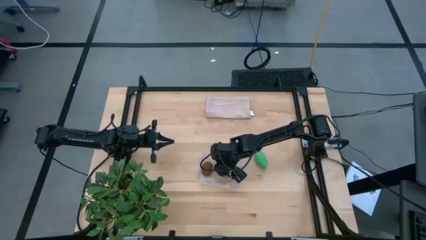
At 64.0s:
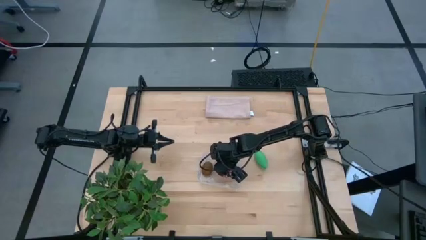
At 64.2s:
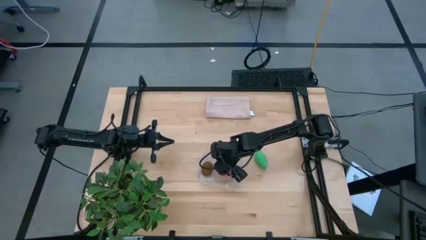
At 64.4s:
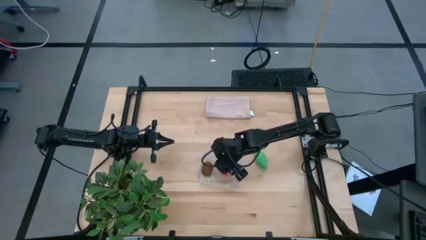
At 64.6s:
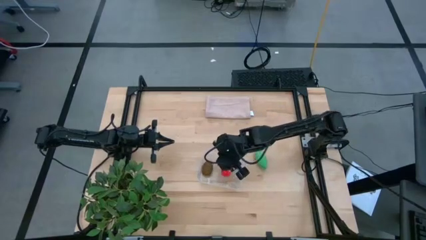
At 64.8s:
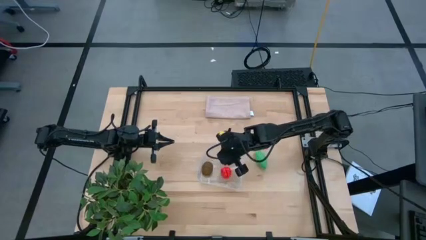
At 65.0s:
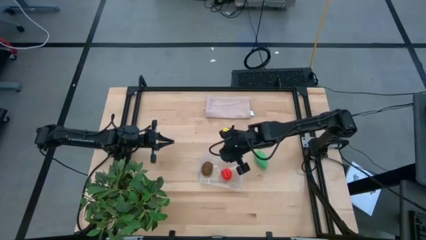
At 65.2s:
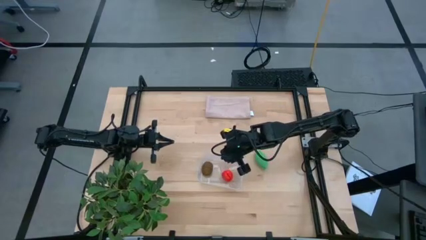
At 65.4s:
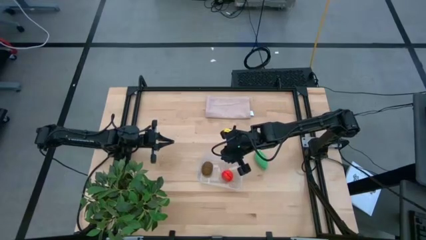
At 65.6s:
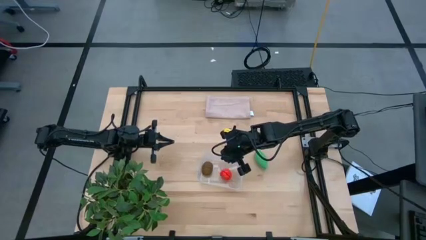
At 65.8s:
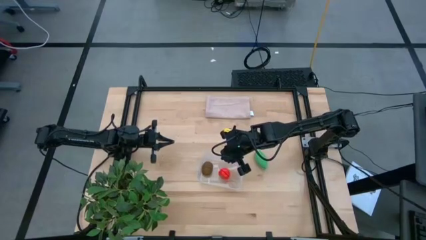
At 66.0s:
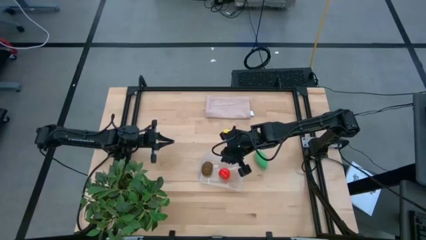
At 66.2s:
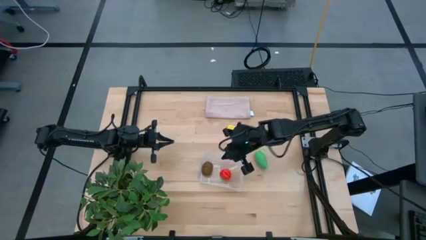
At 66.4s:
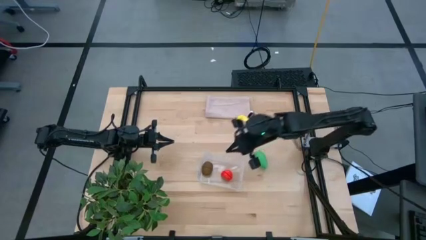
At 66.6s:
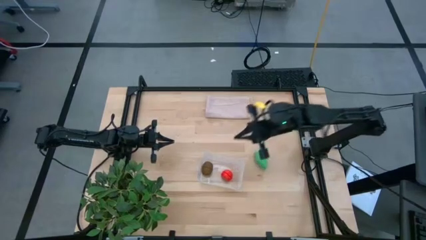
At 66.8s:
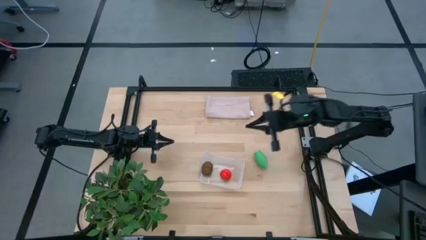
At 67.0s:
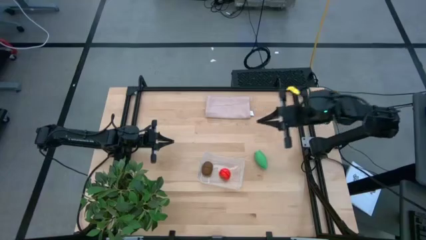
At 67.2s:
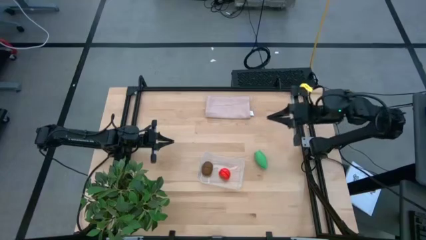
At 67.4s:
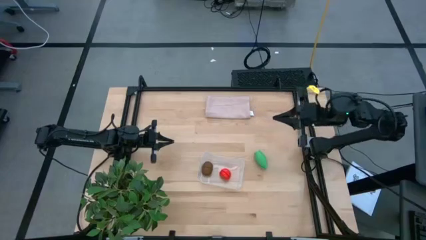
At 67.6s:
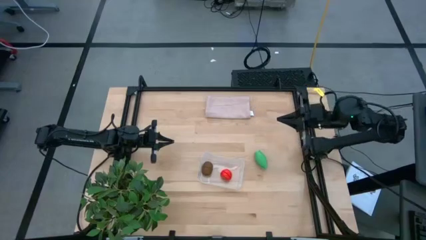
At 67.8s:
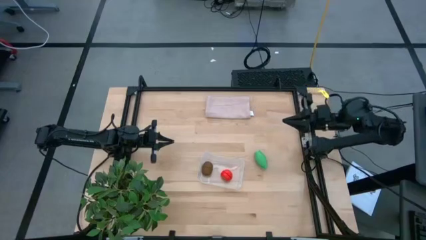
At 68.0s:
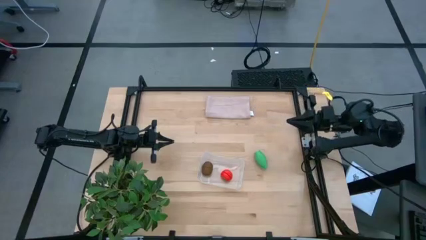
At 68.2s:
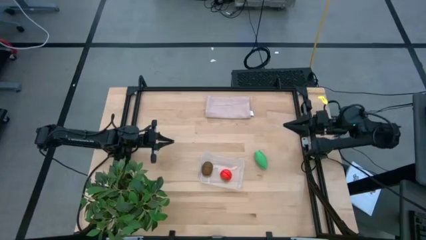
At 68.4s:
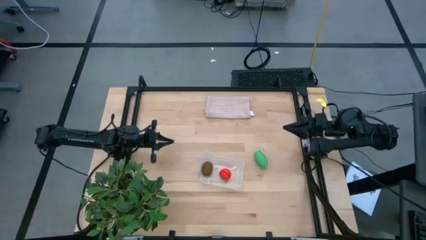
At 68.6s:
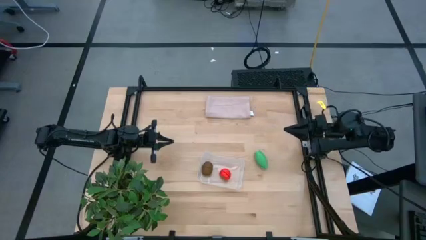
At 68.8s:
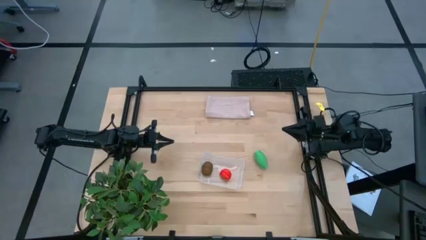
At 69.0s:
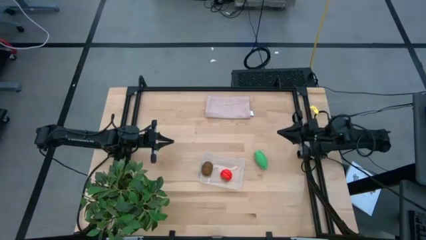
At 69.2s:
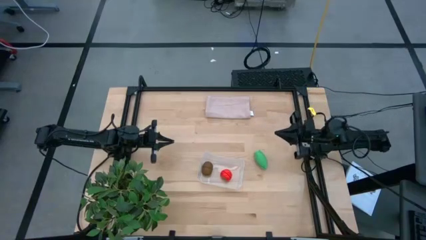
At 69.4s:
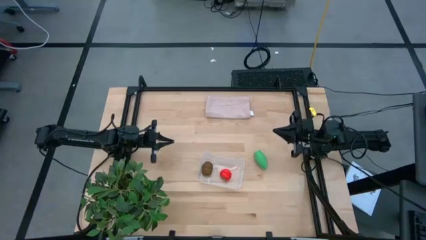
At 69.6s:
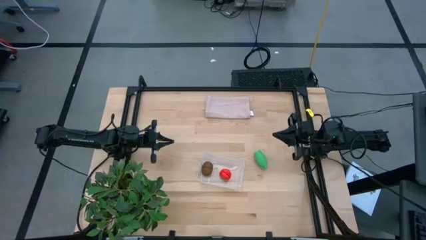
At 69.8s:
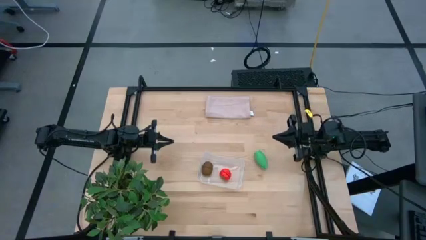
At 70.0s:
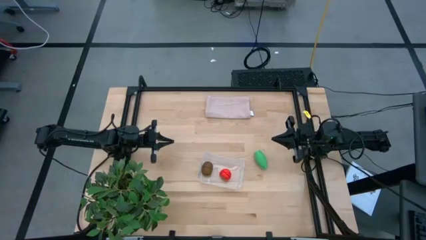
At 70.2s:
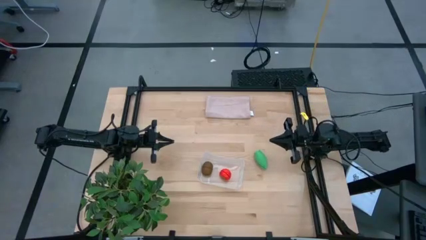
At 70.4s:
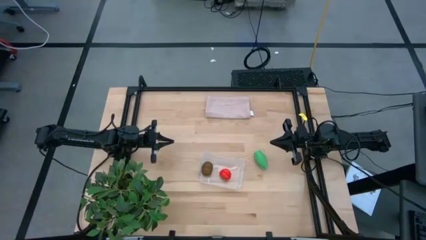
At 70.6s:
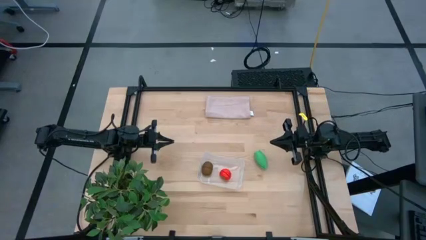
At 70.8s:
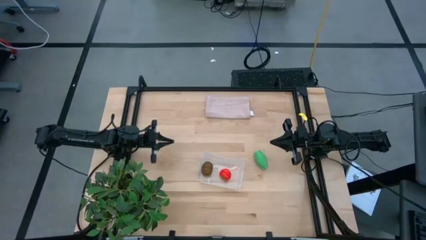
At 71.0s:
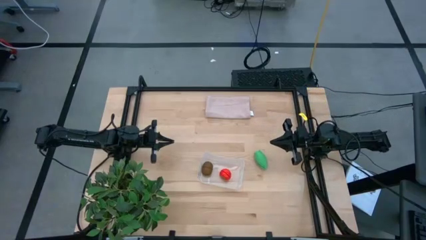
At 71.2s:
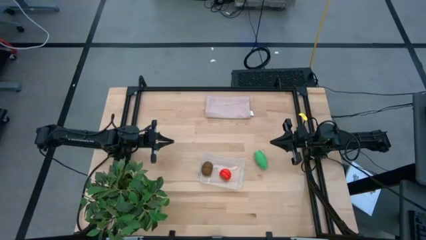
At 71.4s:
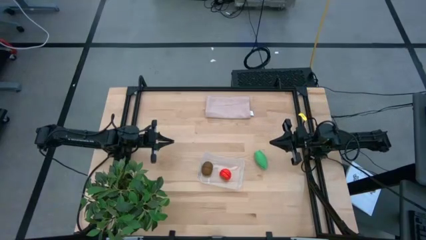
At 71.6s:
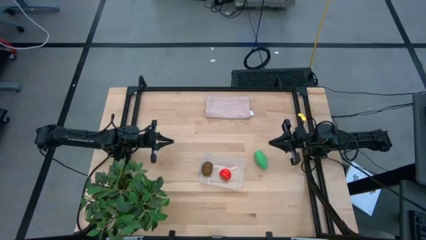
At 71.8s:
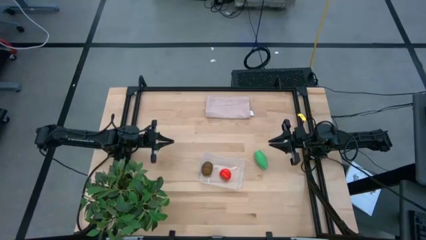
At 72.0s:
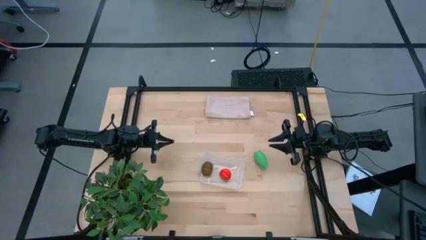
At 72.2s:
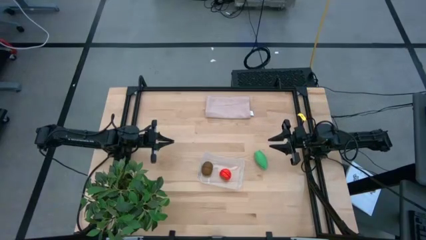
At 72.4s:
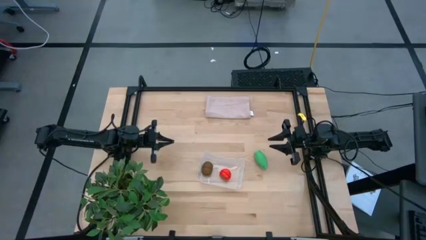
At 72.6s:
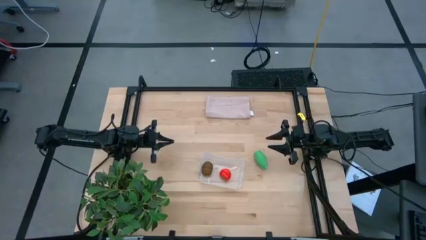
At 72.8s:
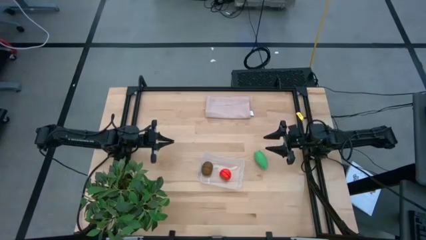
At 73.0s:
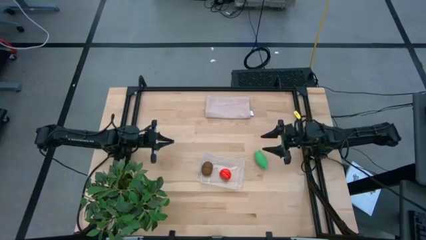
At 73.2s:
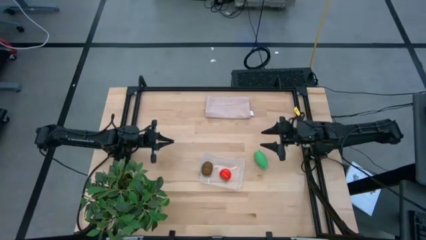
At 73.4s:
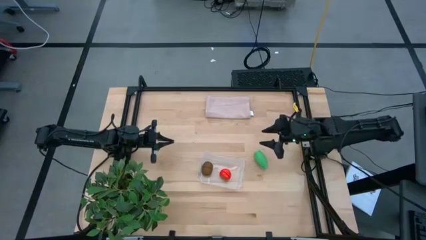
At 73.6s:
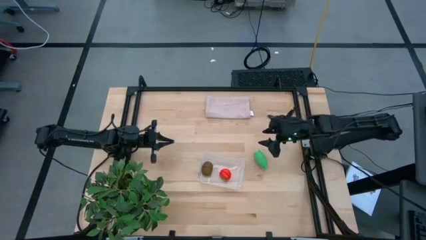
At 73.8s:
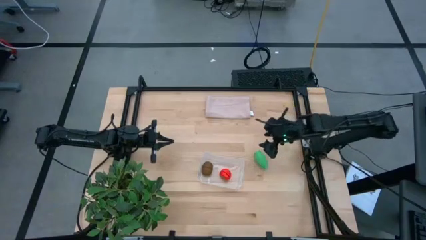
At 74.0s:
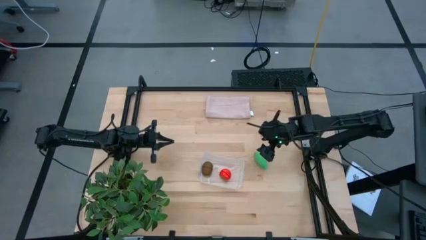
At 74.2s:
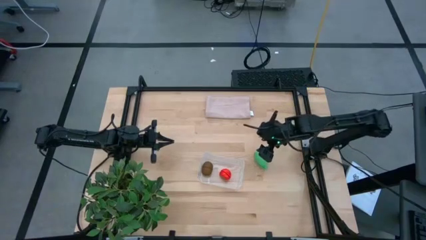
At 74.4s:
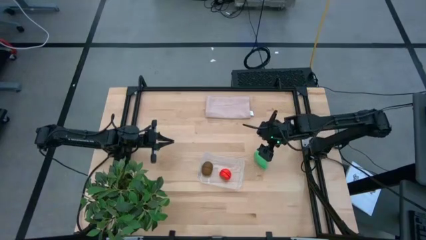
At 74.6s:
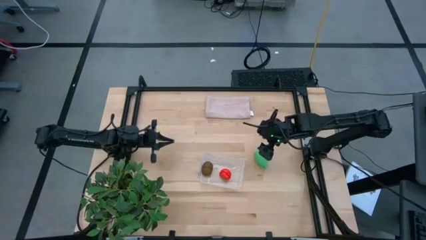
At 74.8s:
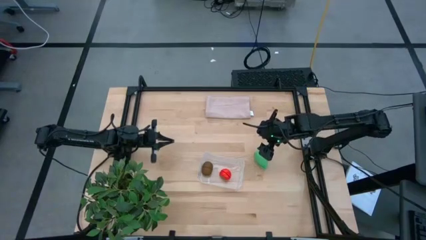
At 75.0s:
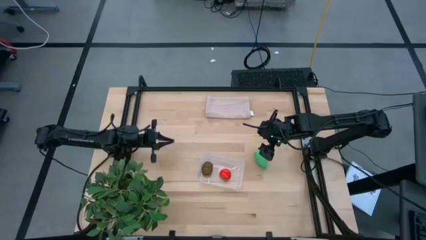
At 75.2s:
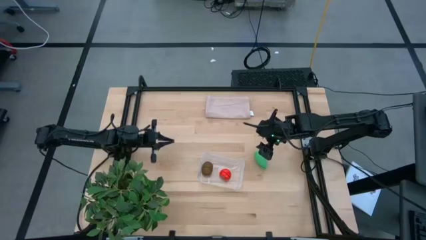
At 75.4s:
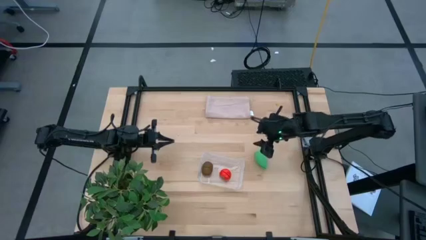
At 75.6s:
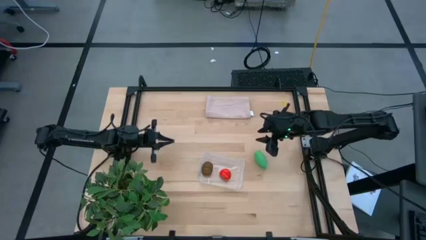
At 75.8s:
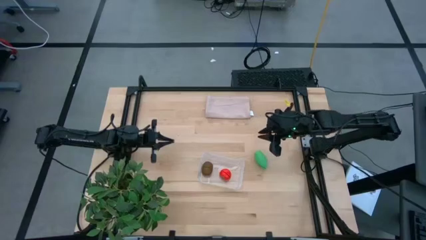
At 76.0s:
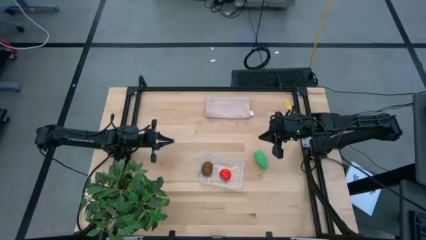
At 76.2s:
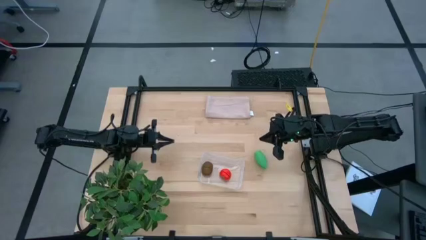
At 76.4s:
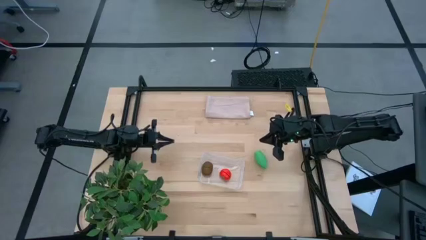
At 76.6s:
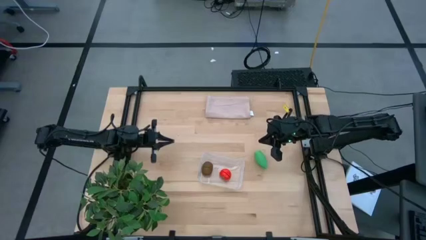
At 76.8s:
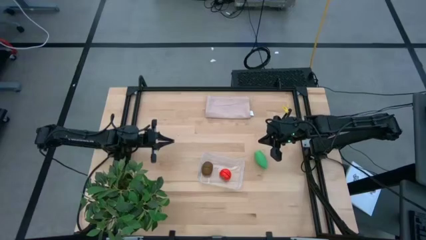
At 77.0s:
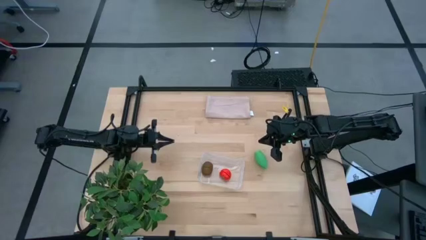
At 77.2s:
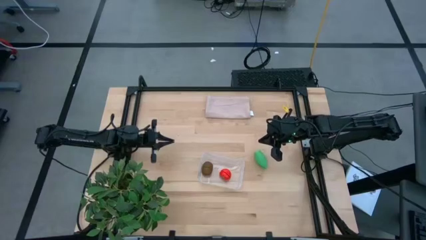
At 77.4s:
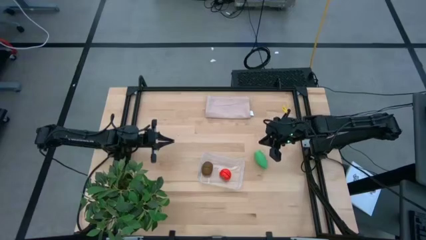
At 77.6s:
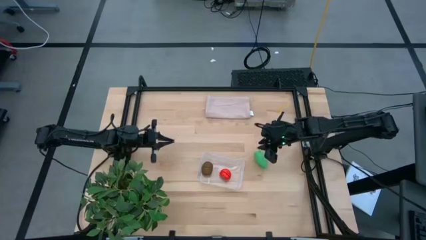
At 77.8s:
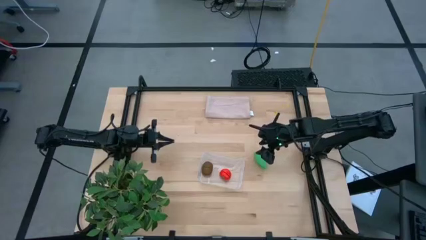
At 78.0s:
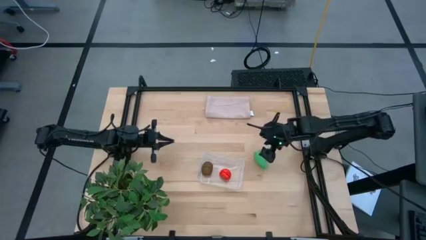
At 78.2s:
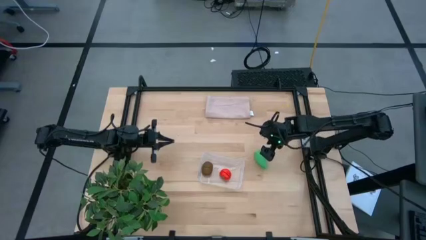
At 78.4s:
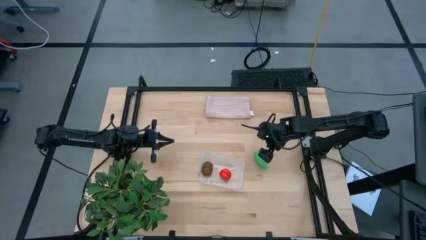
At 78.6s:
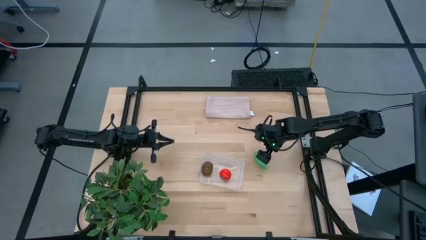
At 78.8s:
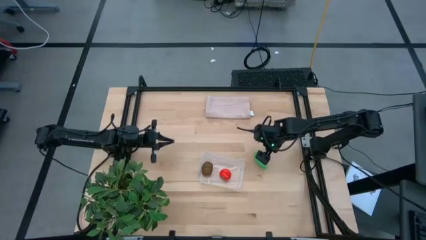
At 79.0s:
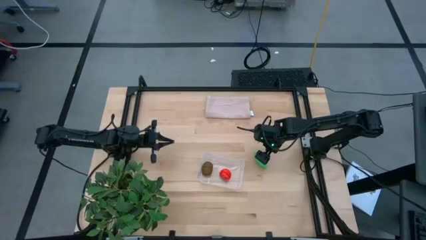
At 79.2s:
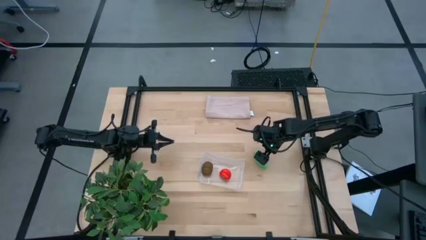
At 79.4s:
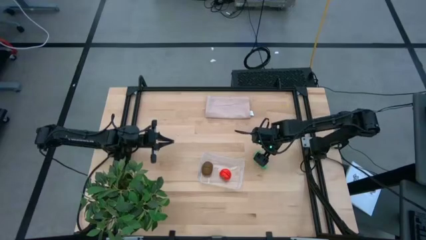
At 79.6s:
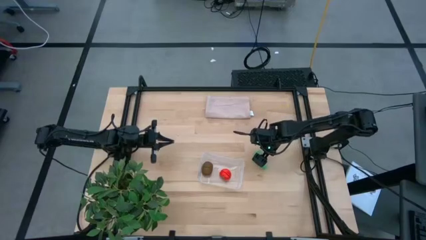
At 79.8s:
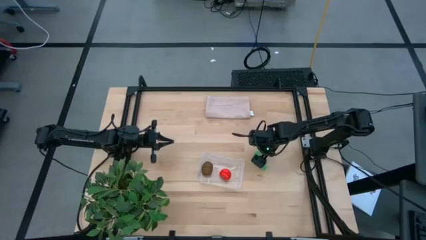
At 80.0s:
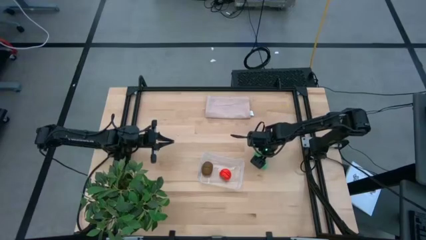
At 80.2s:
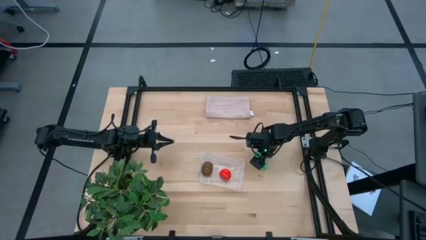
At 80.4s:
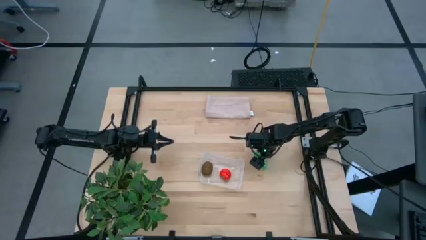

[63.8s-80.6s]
Task: Pick and placing Produce into tupperware
Put the green corn into the transparent bin

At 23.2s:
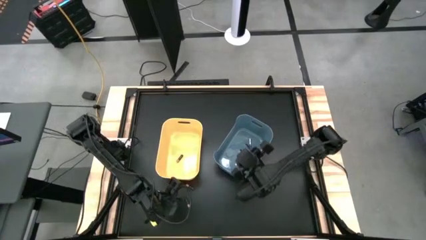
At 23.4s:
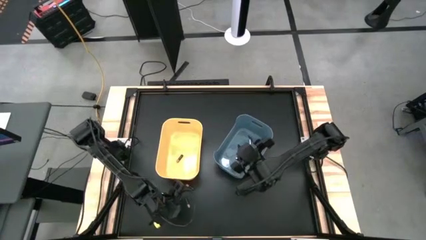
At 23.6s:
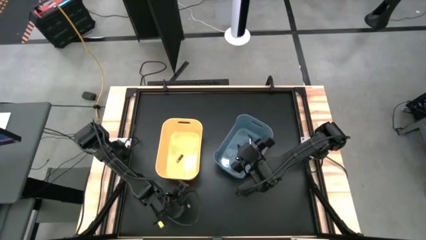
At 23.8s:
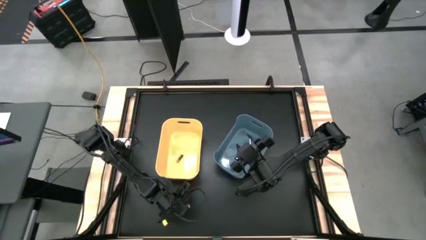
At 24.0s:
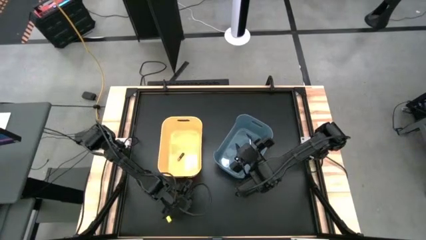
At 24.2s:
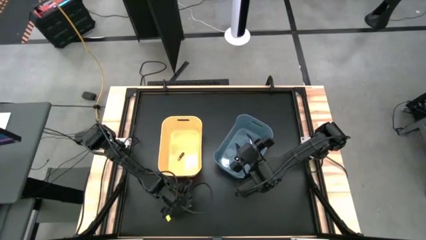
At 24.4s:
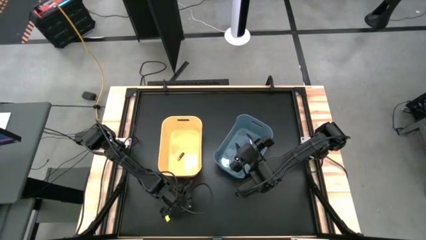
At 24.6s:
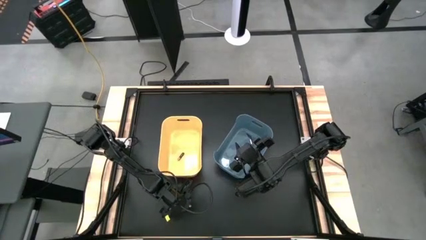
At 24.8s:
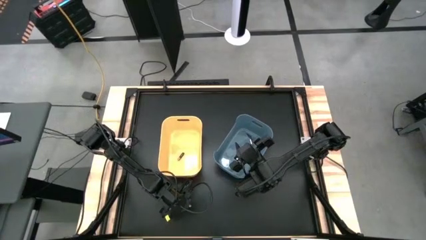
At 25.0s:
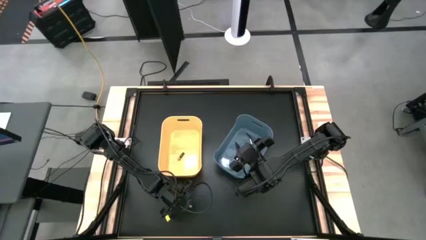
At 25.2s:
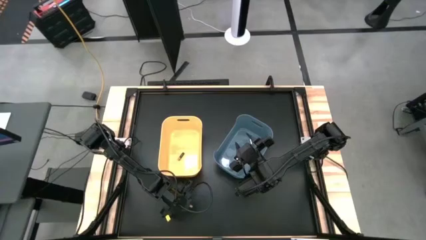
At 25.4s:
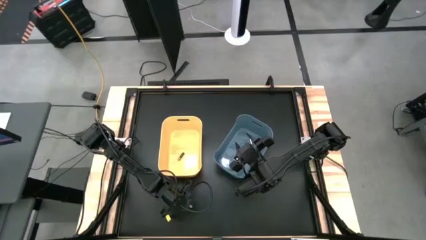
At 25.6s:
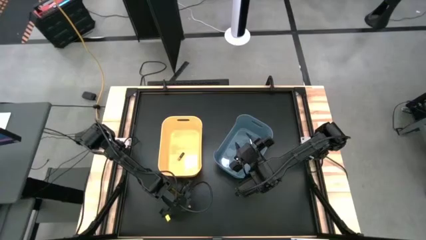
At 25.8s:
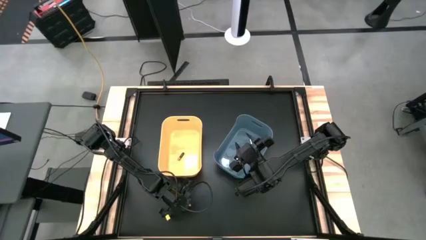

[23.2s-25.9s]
Task: Sort batteries
Put the bottom black battery into the yellow bin
